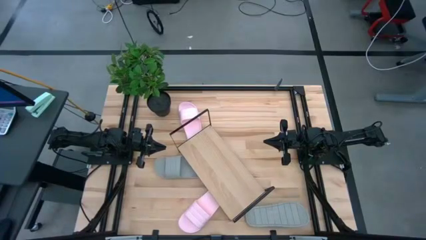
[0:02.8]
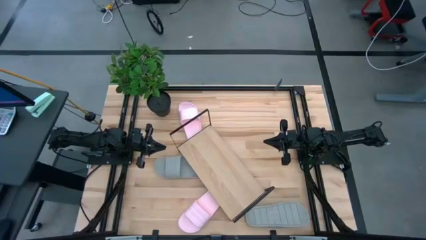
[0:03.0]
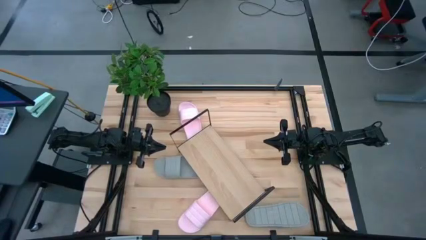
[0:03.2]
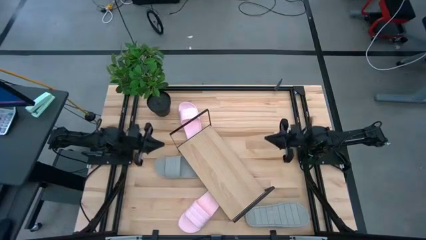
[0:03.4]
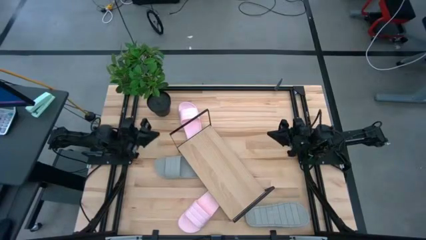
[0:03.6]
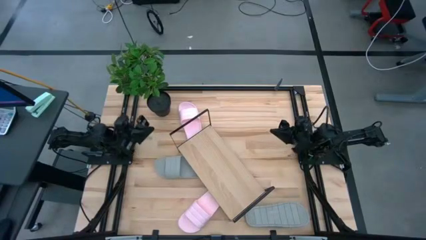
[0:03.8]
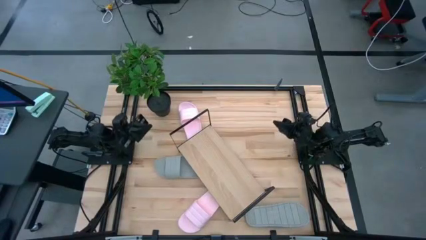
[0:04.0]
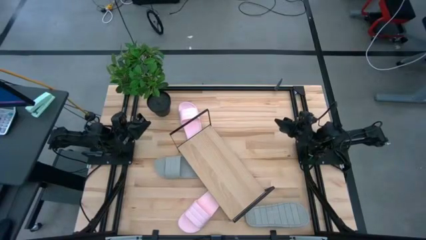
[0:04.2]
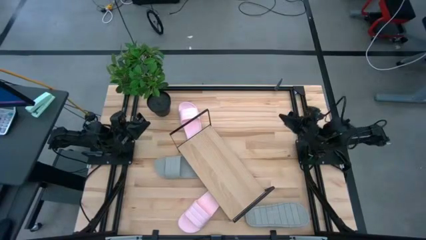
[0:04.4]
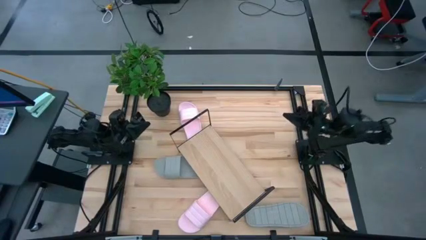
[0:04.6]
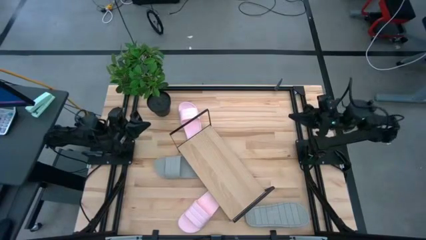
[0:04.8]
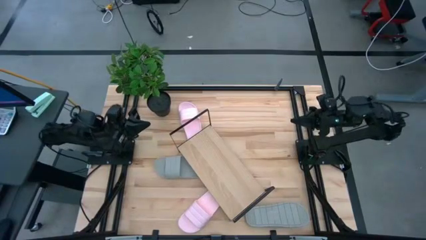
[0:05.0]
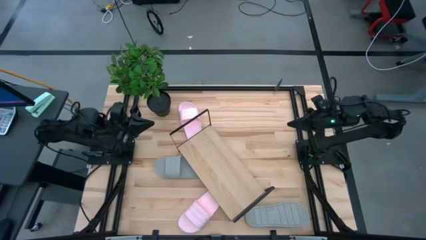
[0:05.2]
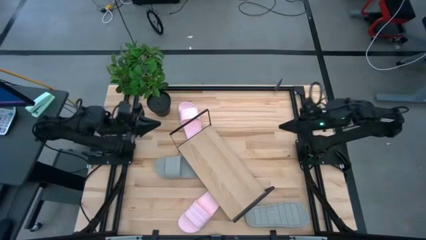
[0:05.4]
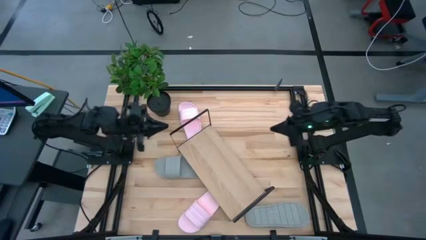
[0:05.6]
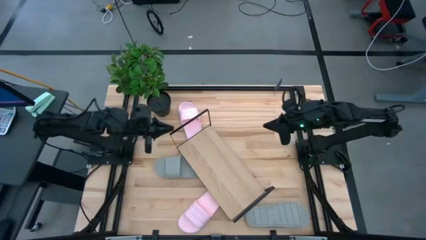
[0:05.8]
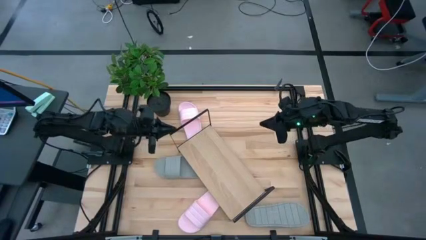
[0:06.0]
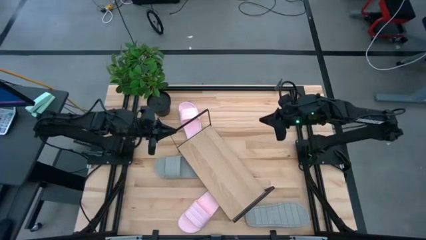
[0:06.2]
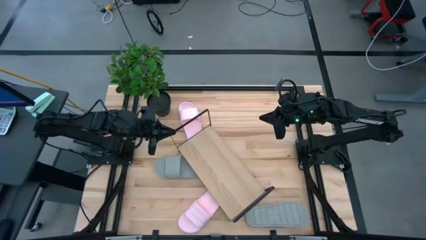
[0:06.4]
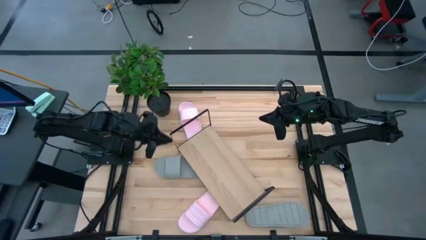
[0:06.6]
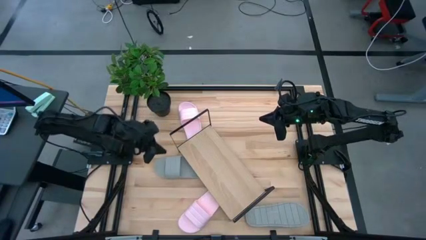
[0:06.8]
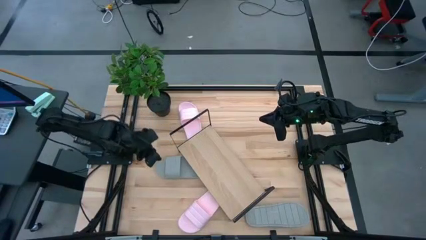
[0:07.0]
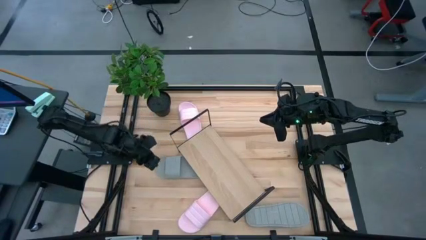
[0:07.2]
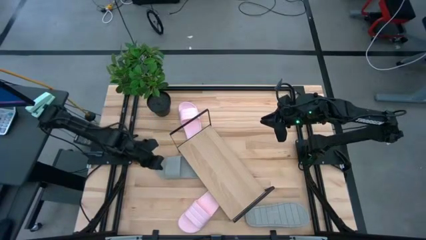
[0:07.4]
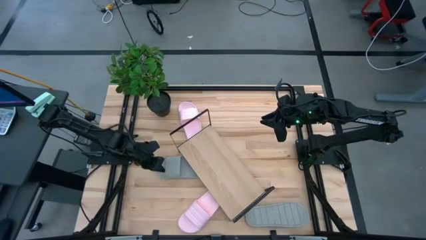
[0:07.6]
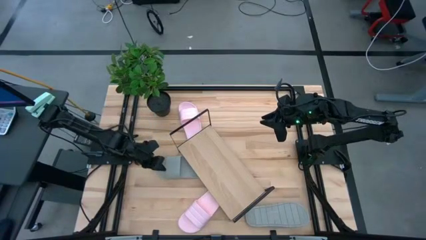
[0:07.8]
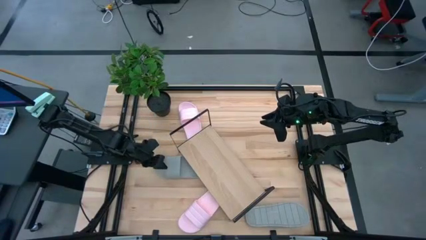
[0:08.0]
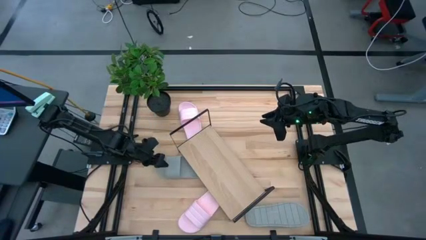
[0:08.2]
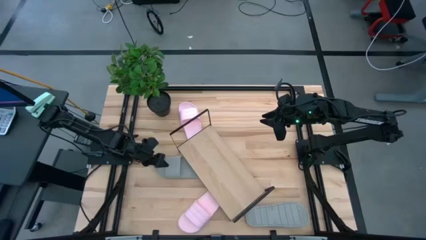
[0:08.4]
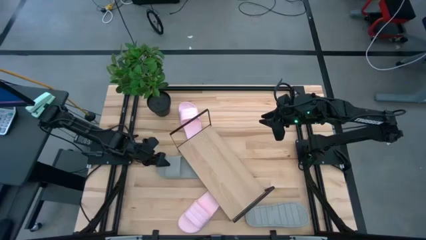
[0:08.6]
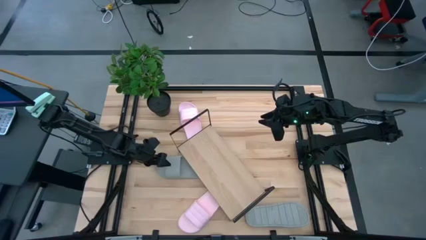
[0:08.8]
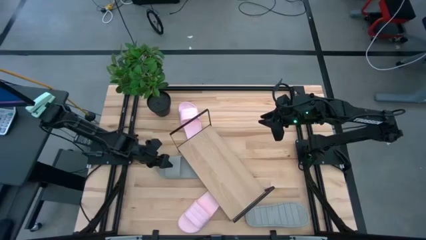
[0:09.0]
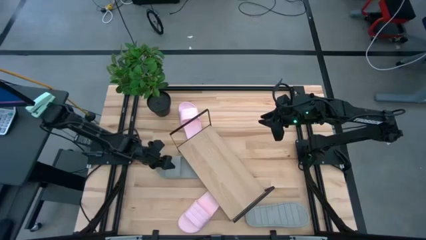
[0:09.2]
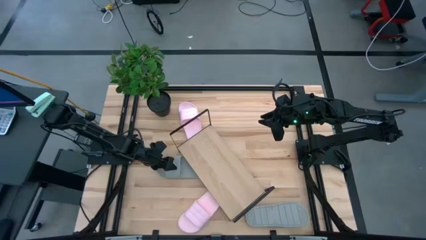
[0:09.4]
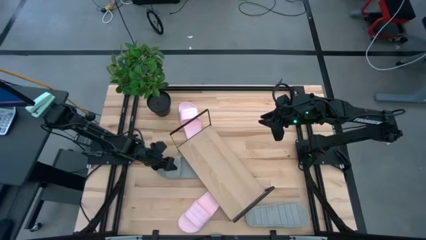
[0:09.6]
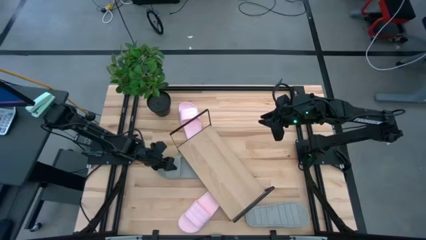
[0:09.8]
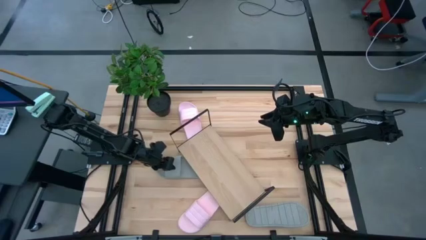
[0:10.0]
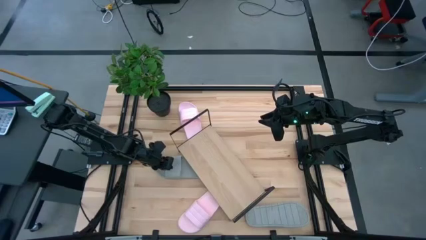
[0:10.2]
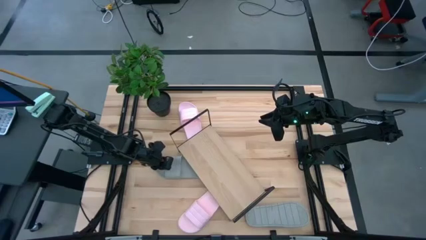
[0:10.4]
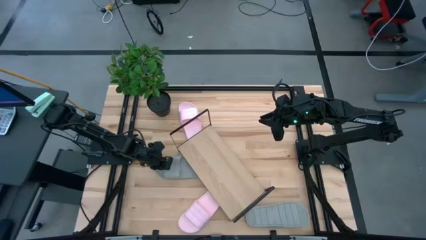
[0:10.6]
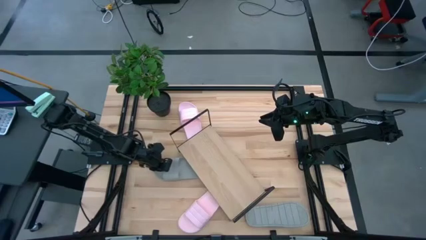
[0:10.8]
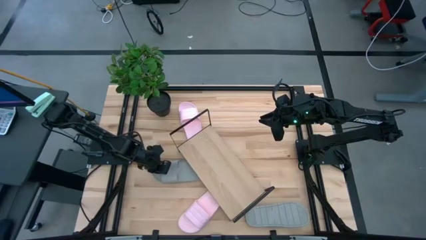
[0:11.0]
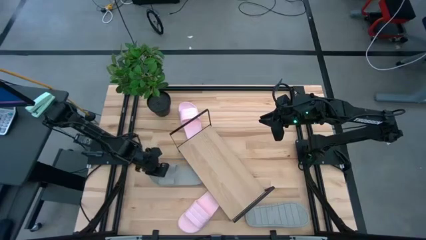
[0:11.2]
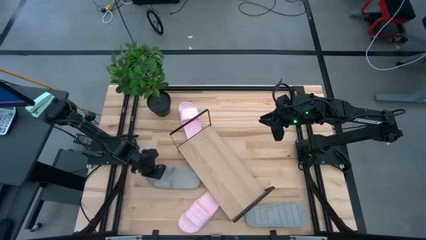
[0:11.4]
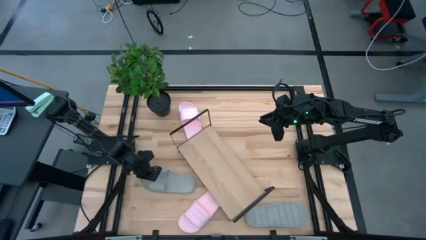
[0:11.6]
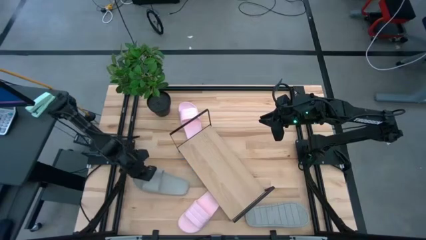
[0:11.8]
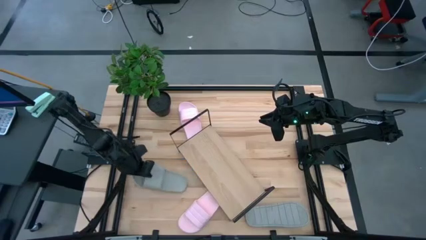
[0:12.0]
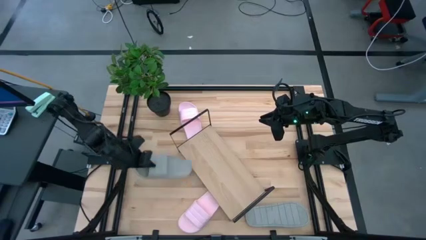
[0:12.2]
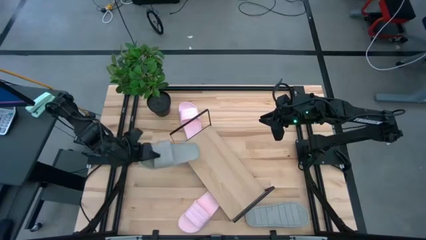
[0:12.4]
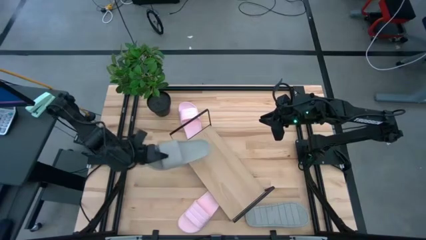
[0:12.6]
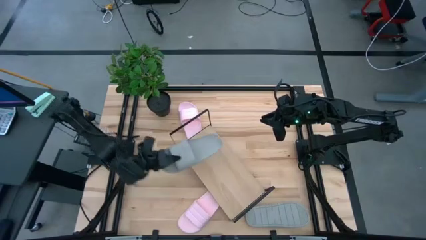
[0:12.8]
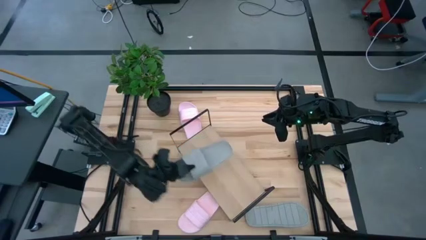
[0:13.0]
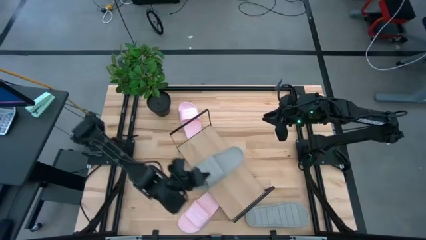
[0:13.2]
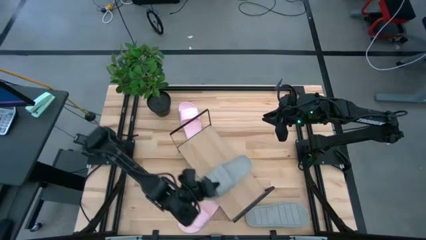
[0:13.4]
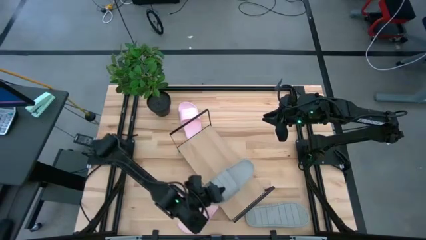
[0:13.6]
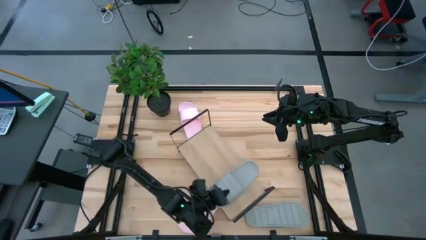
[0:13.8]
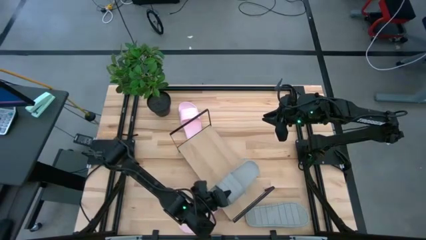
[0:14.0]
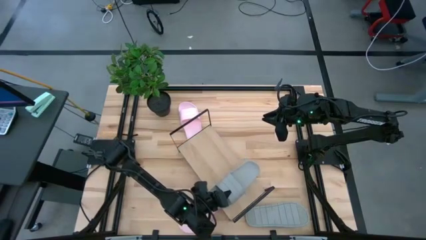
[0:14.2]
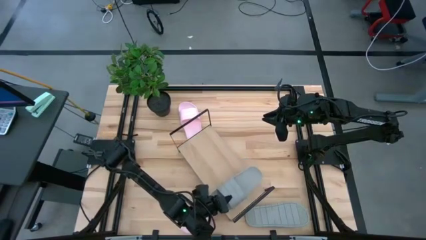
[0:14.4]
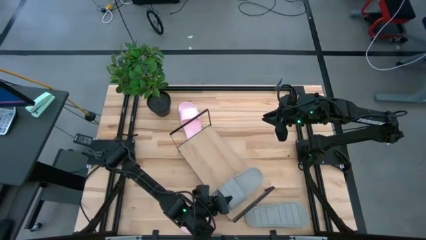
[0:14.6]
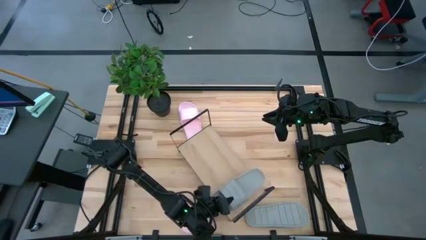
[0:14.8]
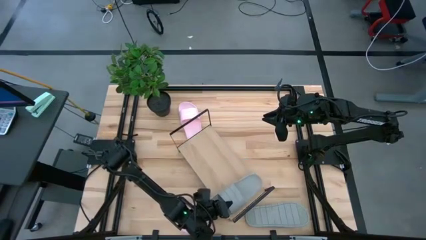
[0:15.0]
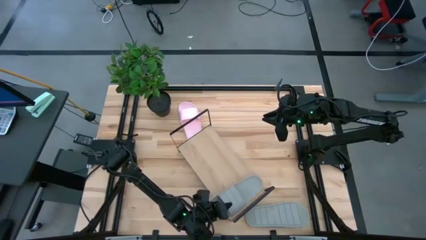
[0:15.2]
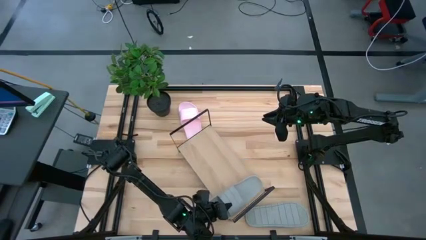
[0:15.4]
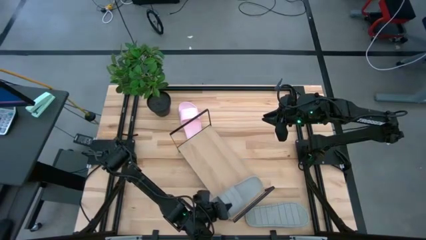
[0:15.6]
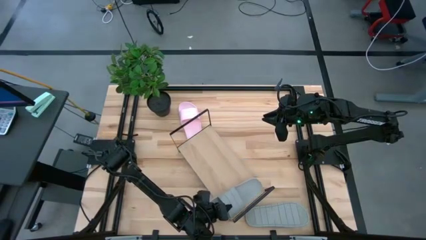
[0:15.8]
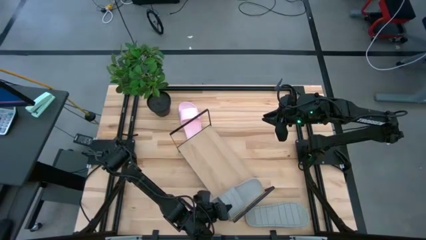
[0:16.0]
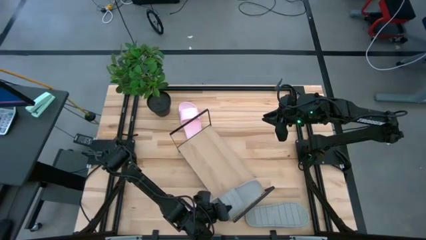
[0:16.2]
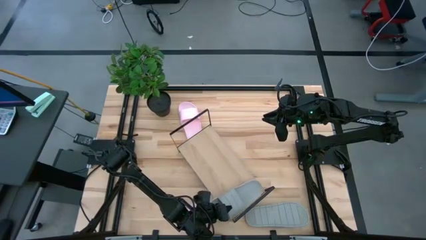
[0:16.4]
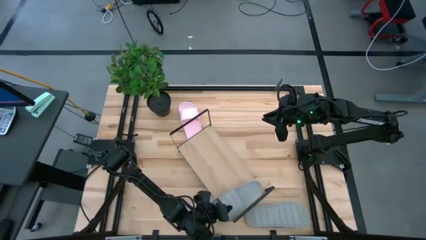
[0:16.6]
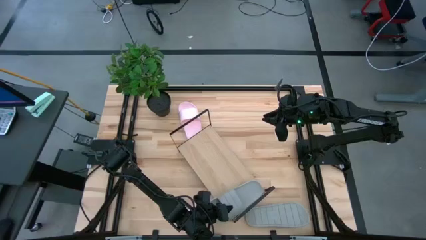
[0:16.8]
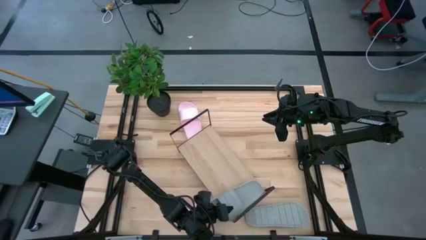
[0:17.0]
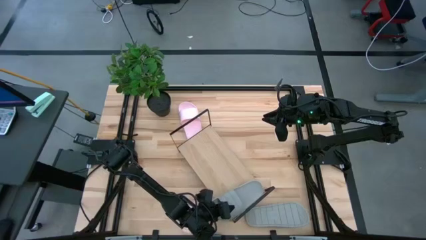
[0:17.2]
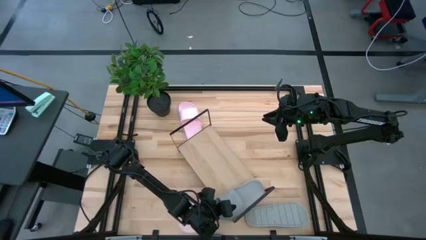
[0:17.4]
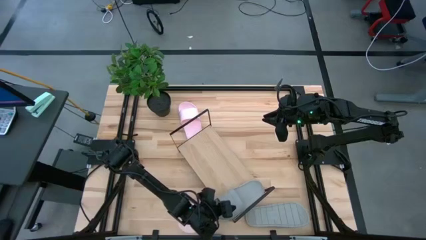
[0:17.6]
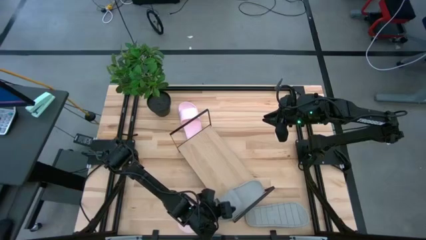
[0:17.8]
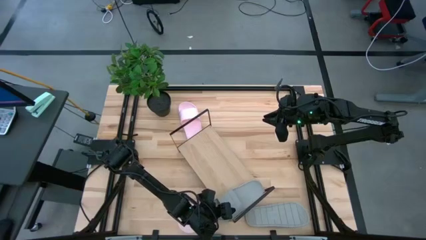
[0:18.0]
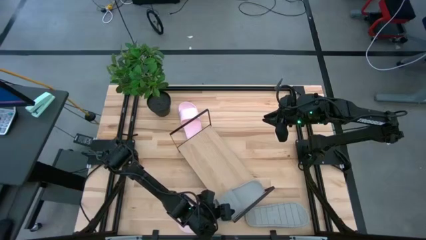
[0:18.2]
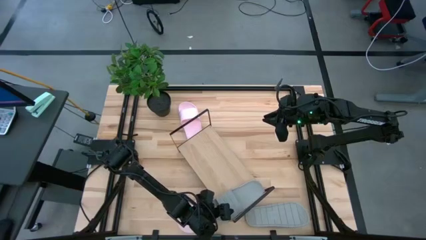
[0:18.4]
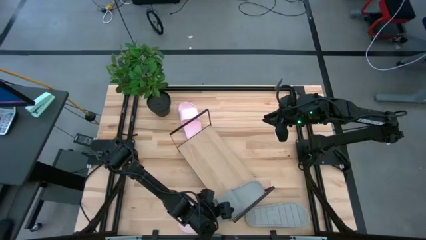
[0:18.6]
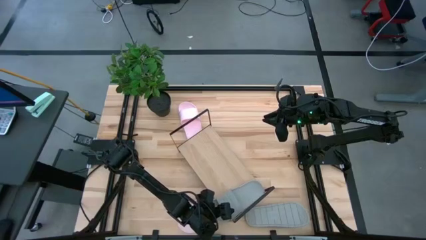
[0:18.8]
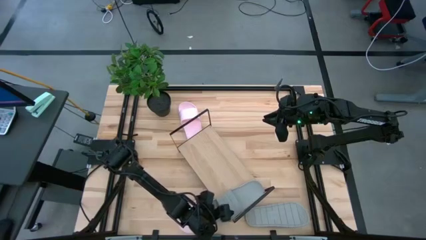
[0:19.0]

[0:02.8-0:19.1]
Task: Pick and place slides into the shelf
Put the left gray slide on the shelf
